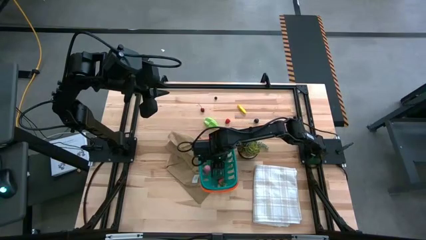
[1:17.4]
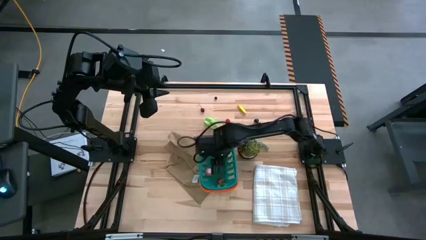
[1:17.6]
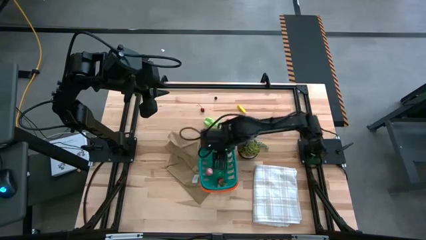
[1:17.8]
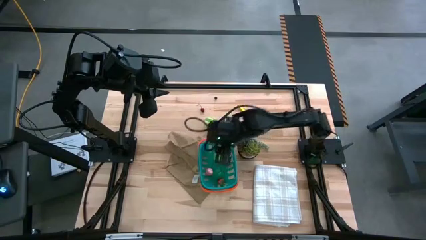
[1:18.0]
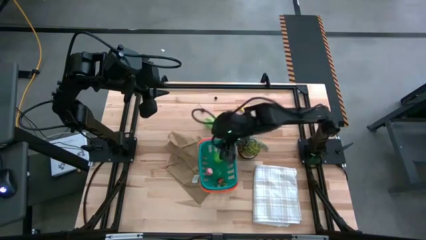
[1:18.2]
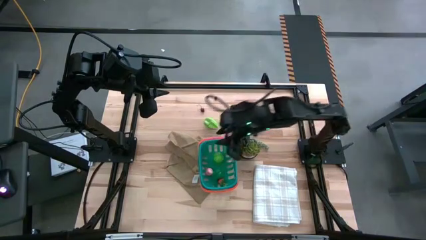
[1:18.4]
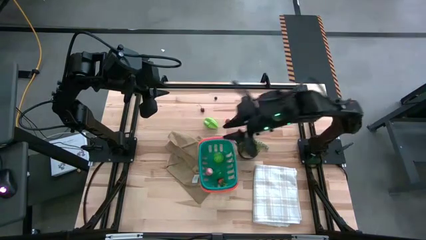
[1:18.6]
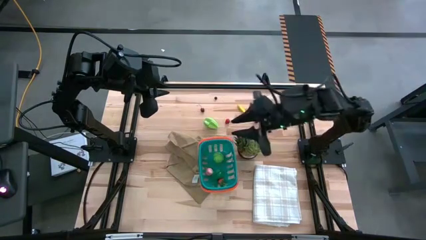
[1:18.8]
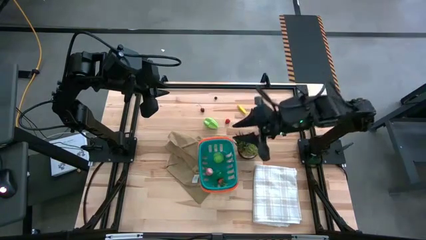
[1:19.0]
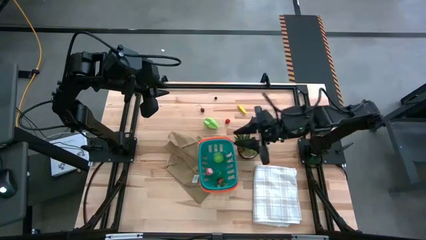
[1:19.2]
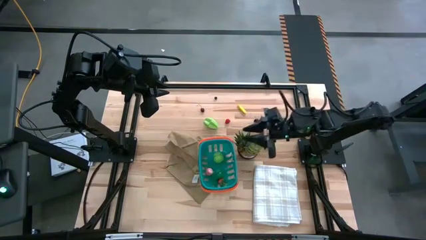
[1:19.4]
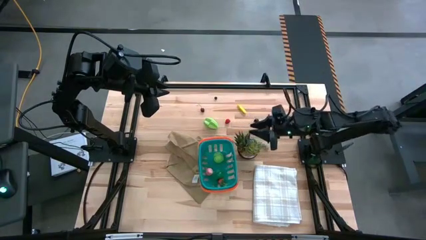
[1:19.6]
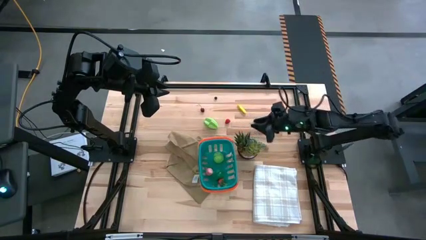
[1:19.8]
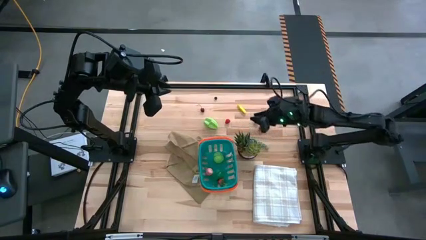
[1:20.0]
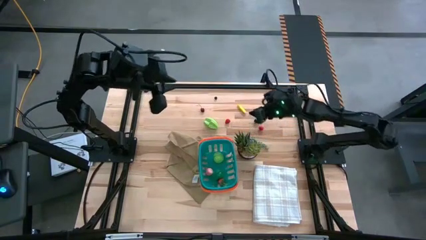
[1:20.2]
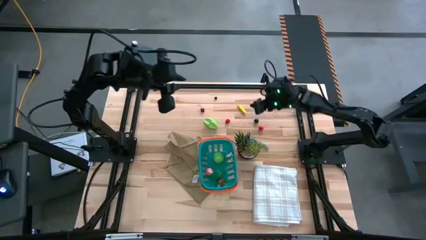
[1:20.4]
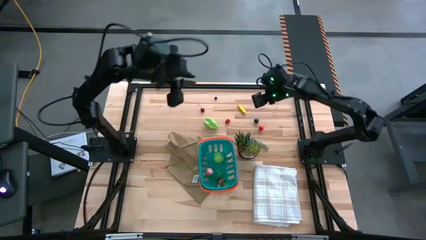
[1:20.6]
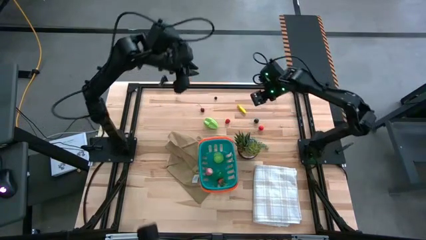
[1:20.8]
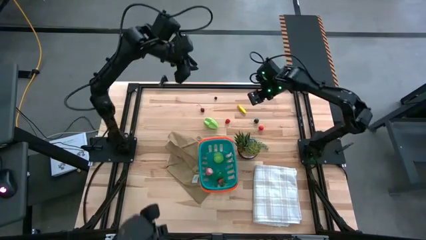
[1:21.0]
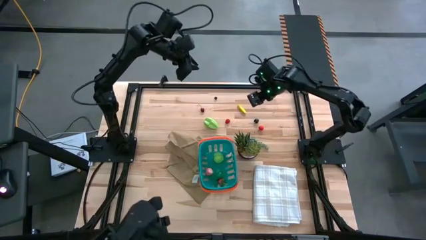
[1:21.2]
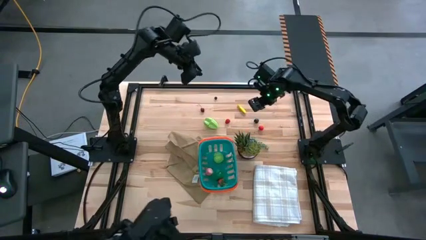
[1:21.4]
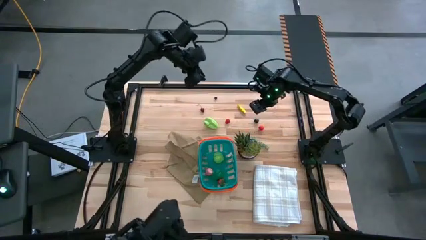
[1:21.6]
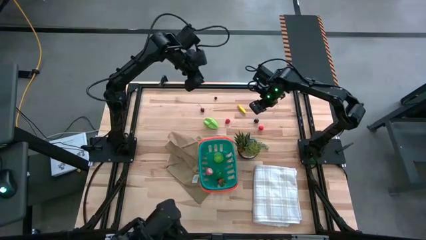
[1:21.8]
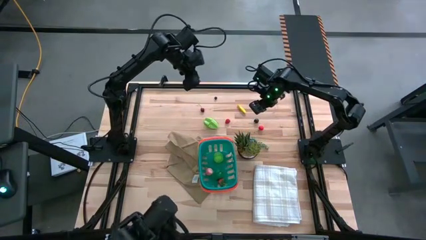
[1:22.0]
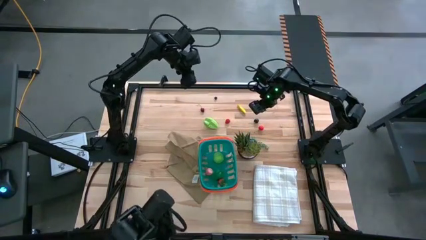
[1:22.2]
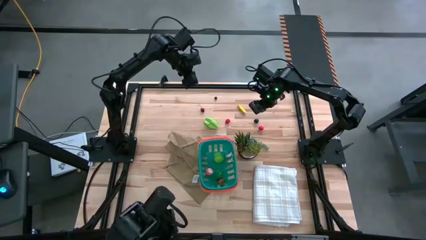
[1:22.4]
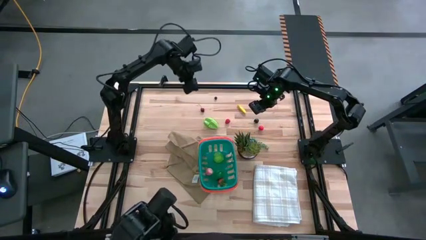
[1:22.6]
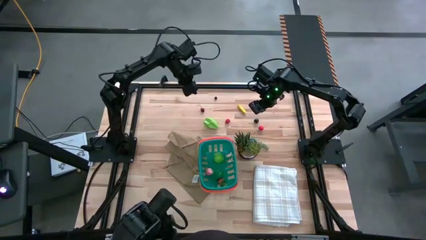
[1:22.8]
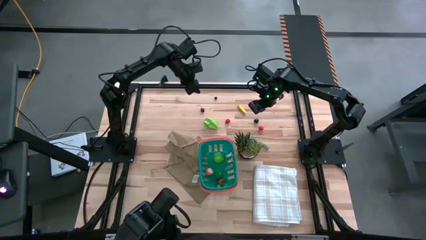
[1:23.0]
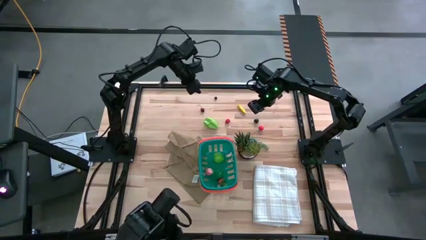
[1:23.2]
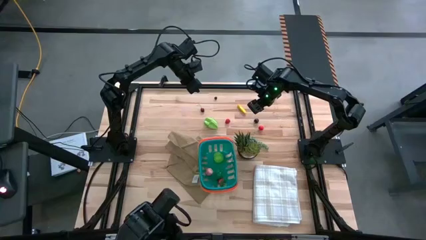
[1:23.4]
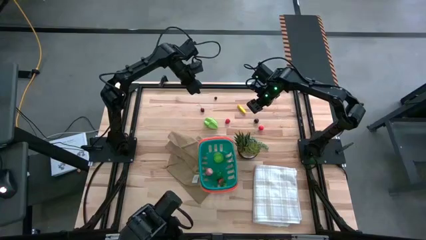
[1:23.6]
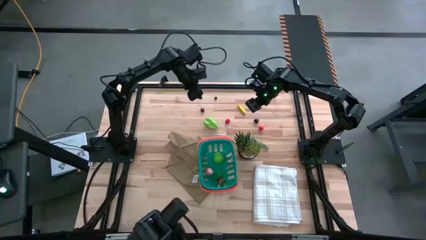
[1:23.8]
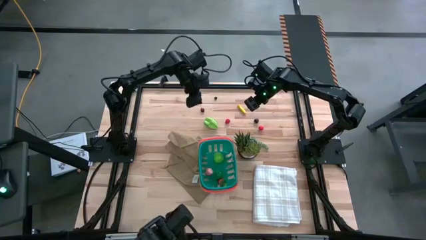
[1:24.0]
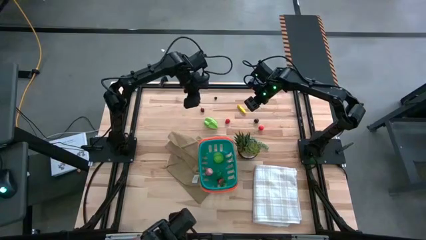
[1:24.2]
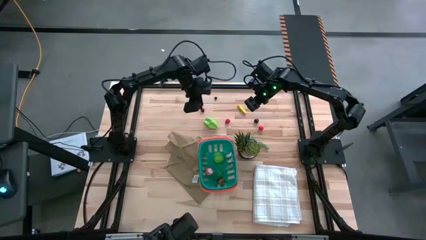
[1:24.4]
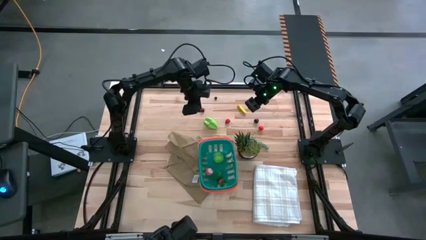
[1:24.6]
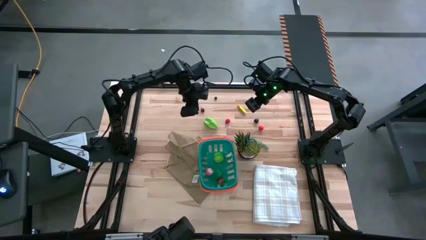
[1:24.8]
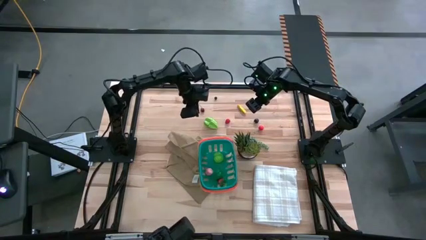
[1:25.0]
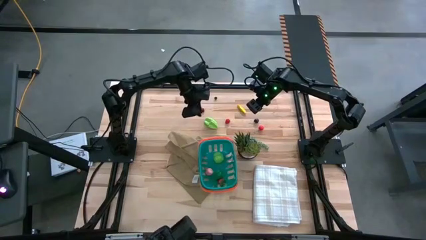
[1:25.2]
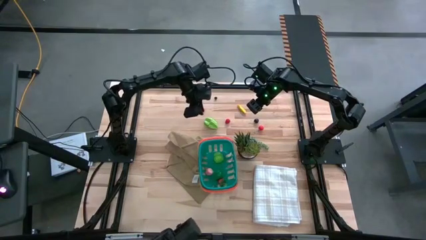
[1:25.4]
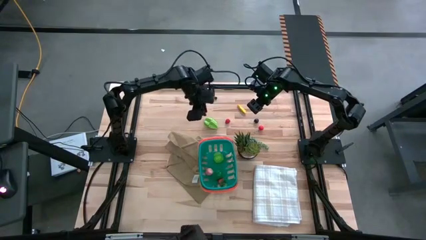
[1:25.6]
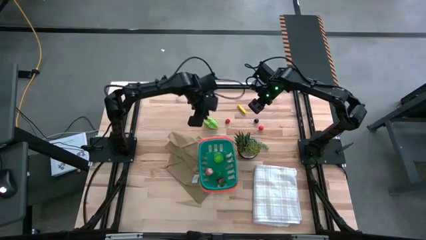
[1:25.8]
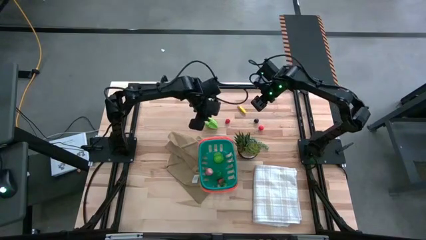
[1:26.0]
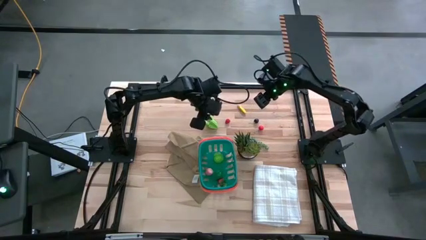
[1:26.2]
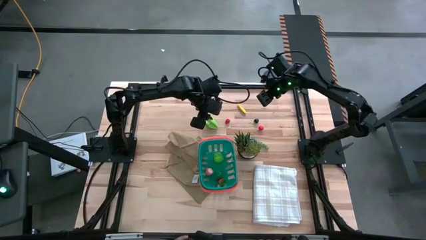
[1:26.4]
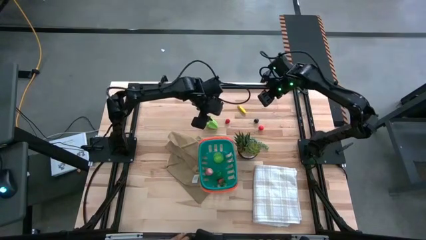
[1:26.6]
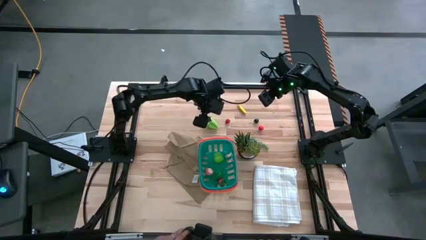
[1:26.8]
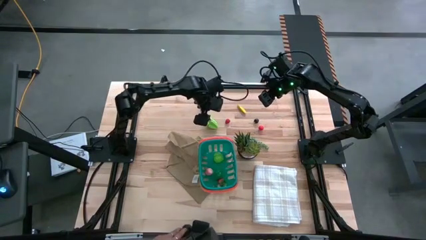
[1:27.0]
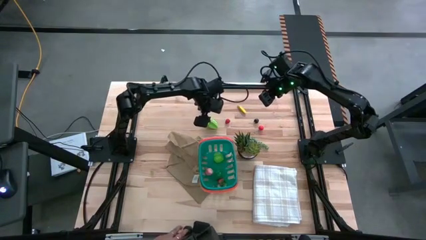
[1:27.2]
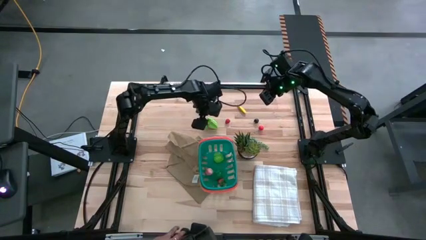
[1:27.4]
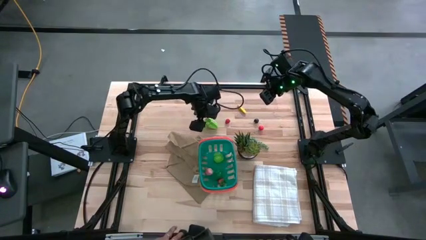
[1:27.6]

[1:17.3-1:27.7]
Task: Pick and placing Produce into tupperware
Put the green starfruit into the green basket
